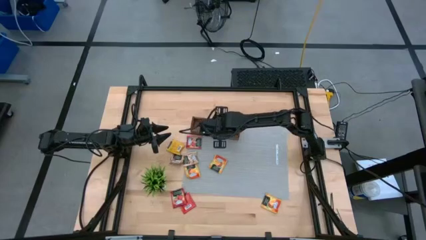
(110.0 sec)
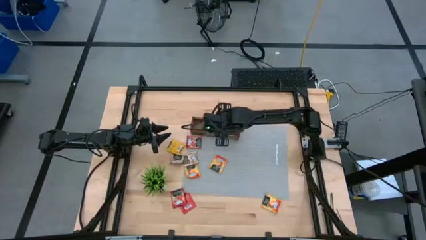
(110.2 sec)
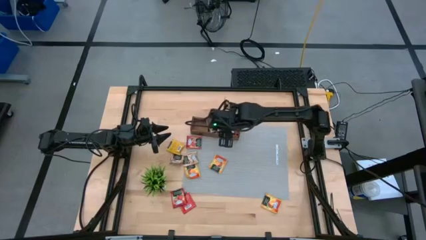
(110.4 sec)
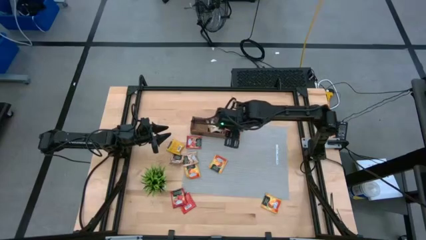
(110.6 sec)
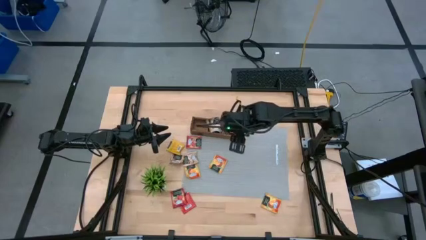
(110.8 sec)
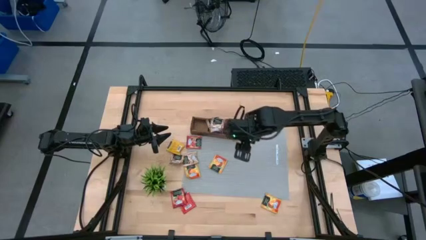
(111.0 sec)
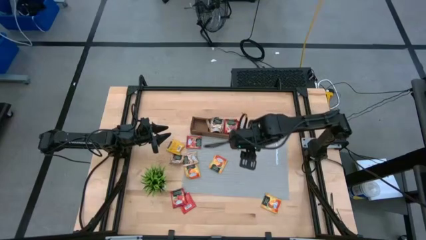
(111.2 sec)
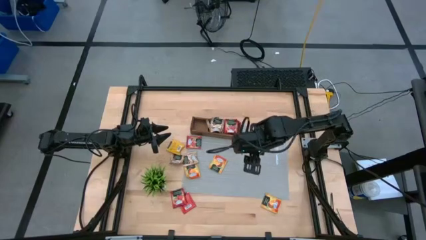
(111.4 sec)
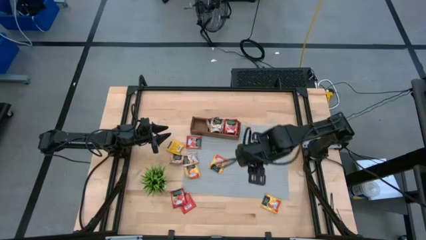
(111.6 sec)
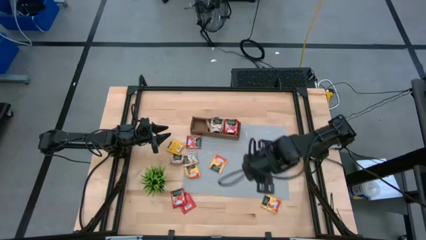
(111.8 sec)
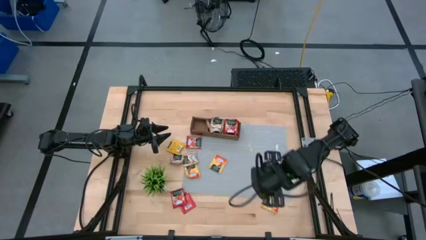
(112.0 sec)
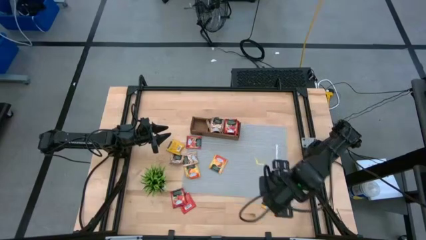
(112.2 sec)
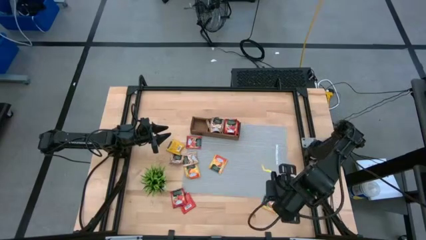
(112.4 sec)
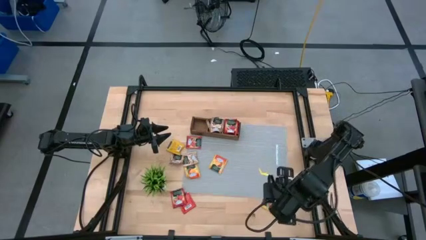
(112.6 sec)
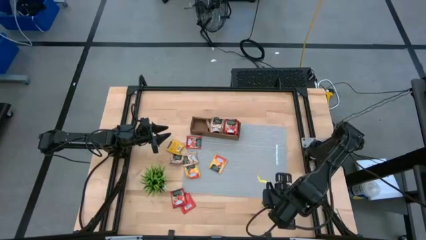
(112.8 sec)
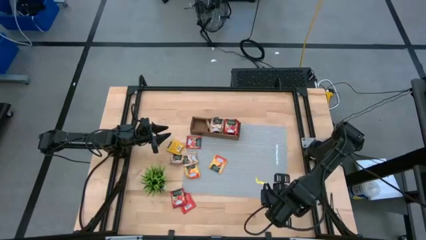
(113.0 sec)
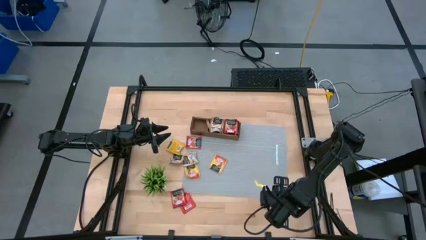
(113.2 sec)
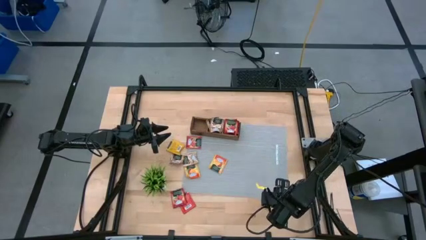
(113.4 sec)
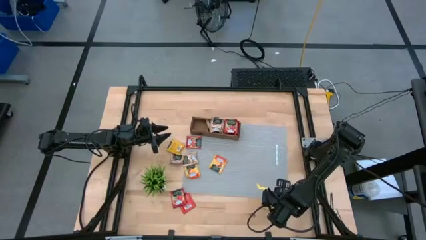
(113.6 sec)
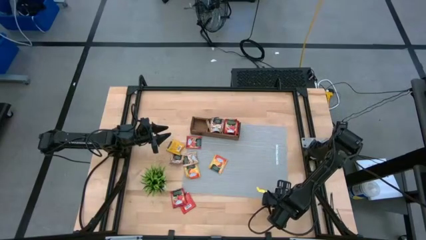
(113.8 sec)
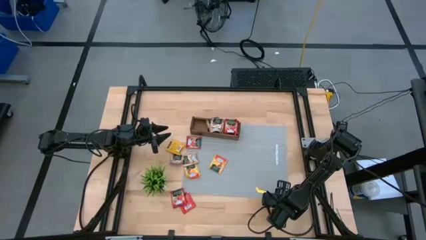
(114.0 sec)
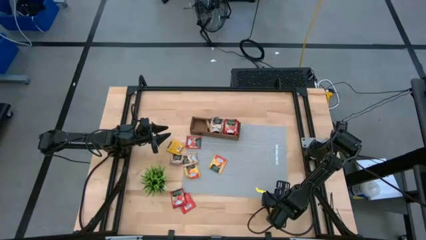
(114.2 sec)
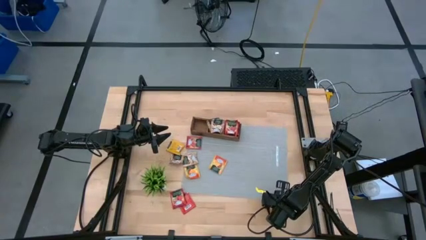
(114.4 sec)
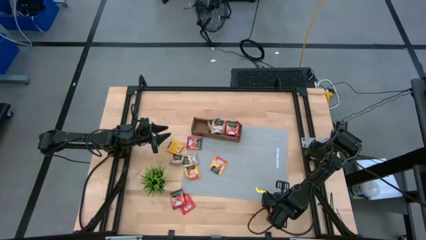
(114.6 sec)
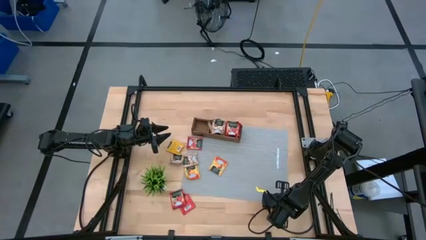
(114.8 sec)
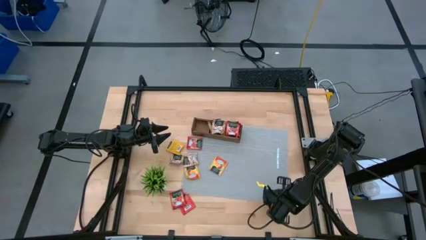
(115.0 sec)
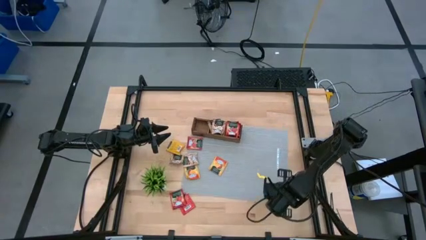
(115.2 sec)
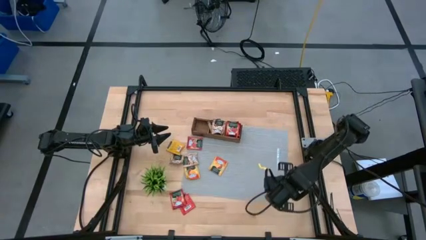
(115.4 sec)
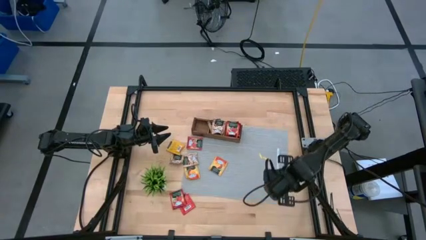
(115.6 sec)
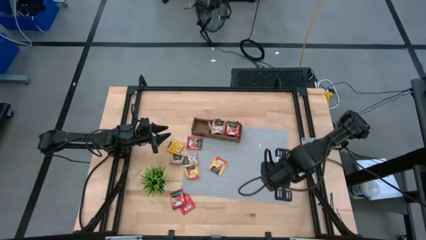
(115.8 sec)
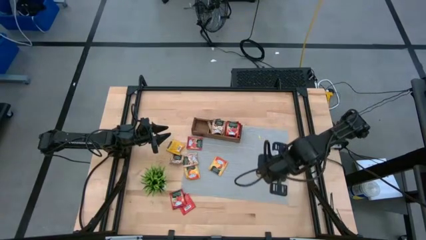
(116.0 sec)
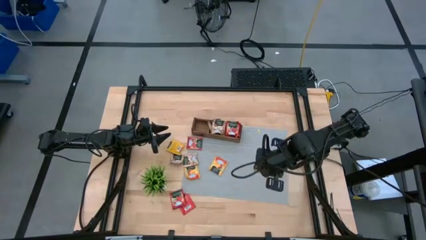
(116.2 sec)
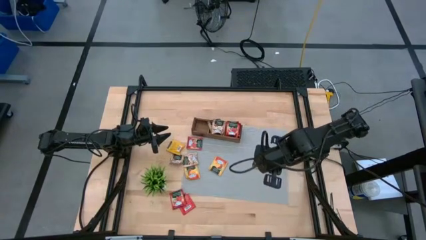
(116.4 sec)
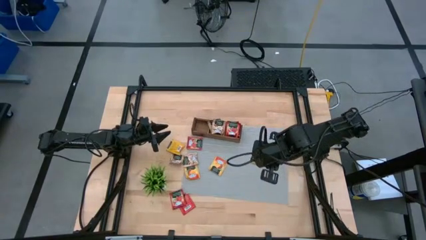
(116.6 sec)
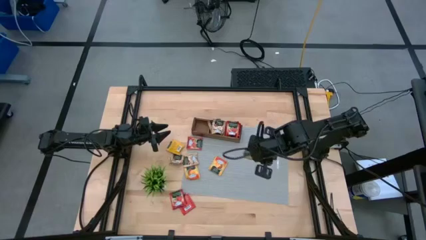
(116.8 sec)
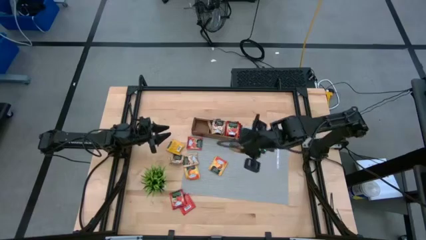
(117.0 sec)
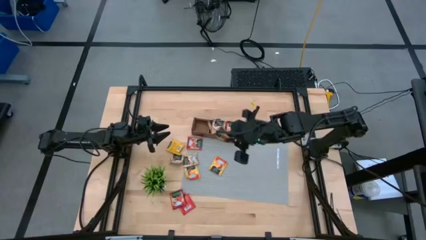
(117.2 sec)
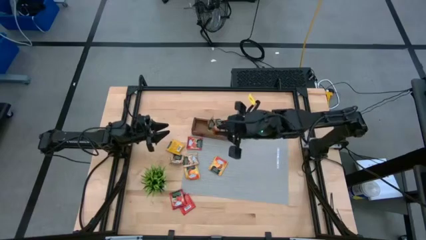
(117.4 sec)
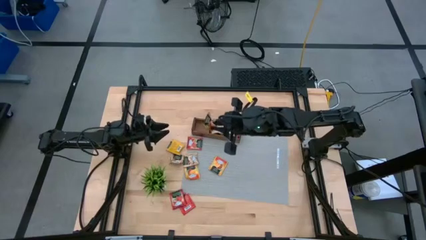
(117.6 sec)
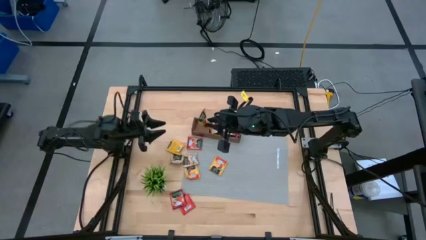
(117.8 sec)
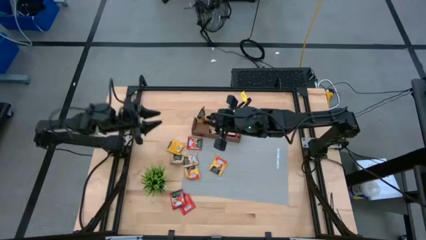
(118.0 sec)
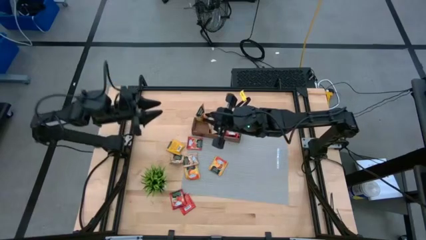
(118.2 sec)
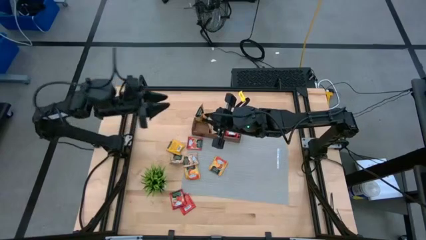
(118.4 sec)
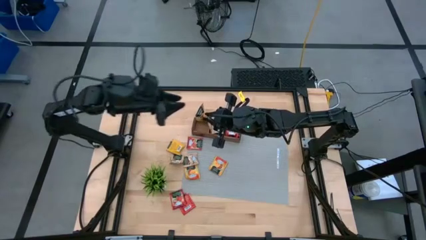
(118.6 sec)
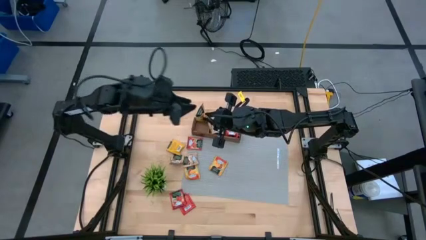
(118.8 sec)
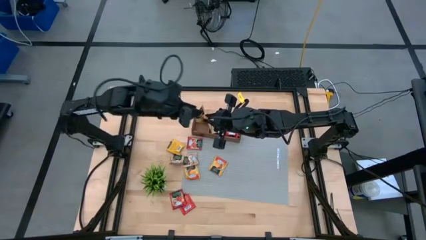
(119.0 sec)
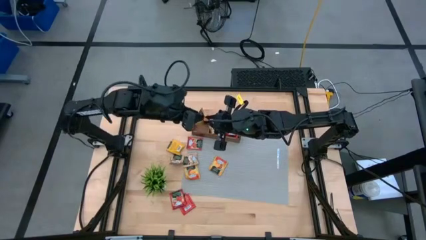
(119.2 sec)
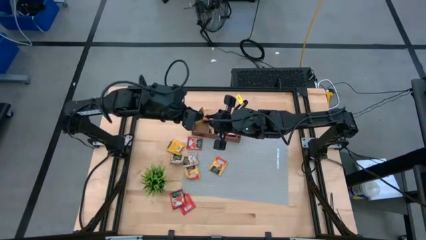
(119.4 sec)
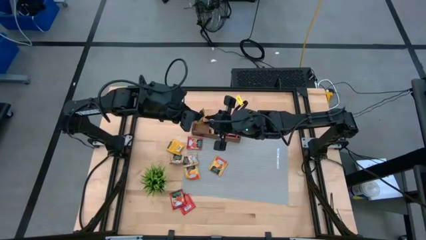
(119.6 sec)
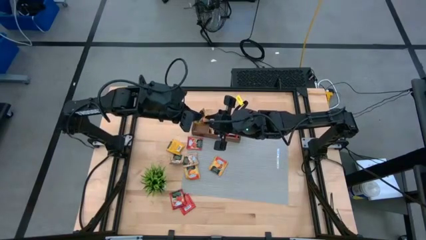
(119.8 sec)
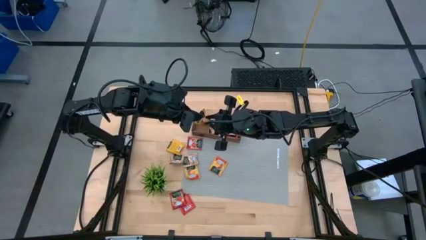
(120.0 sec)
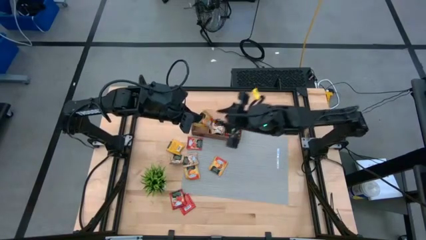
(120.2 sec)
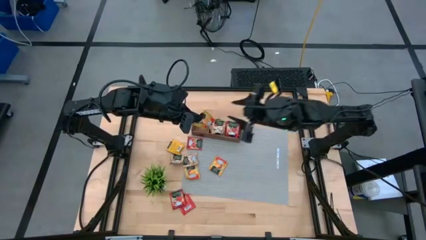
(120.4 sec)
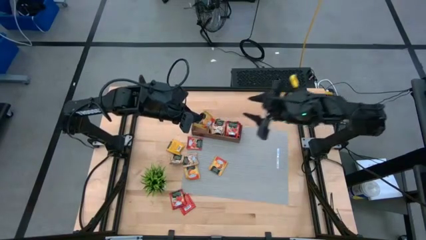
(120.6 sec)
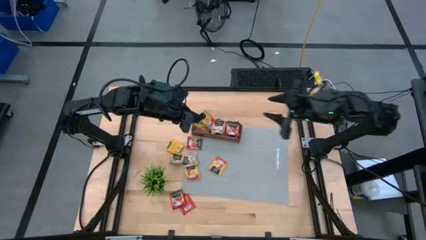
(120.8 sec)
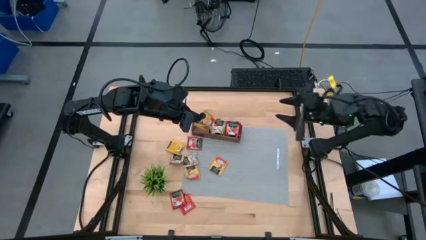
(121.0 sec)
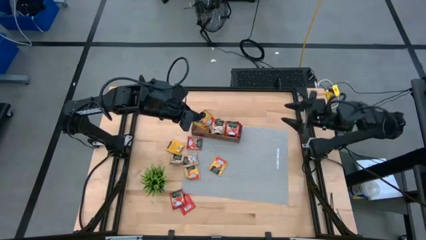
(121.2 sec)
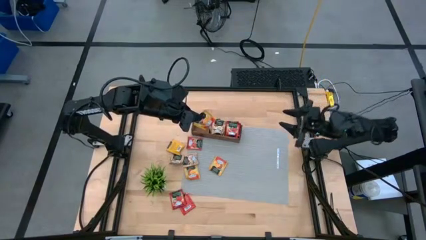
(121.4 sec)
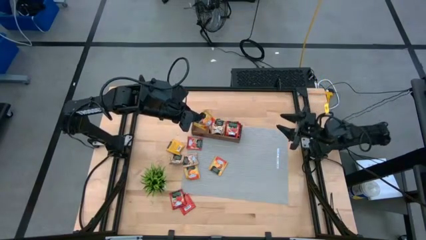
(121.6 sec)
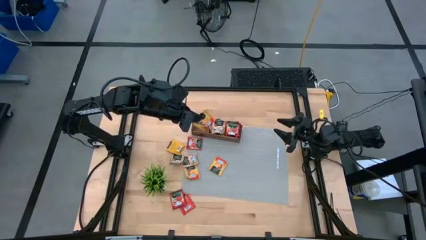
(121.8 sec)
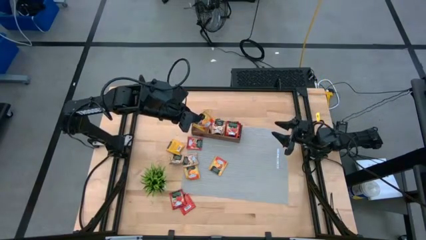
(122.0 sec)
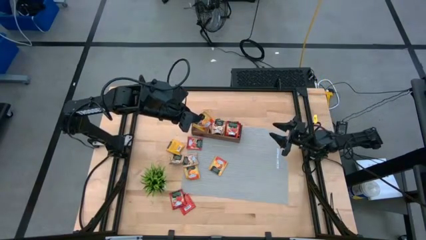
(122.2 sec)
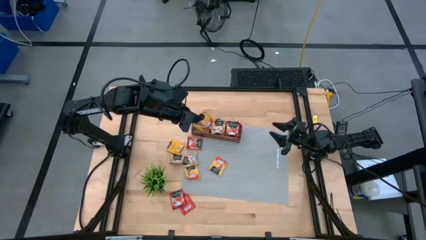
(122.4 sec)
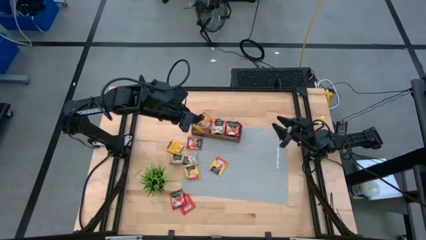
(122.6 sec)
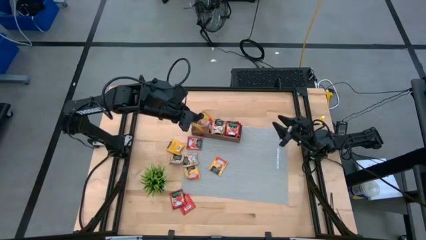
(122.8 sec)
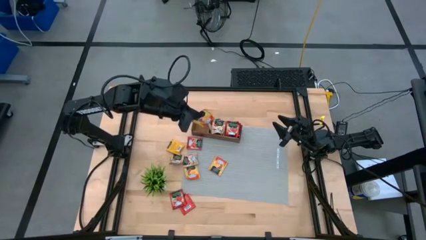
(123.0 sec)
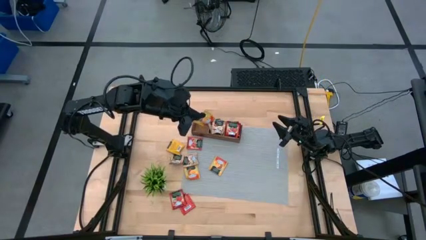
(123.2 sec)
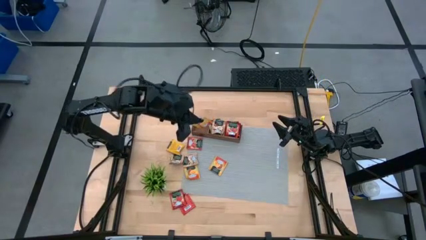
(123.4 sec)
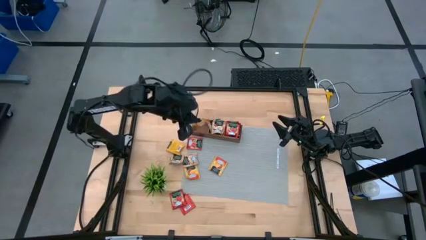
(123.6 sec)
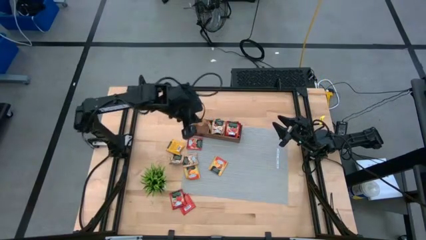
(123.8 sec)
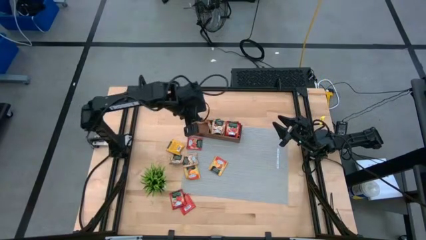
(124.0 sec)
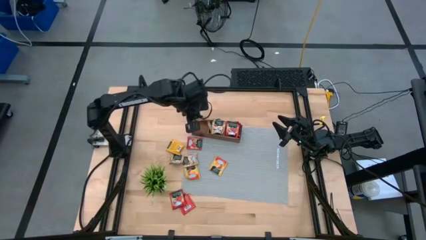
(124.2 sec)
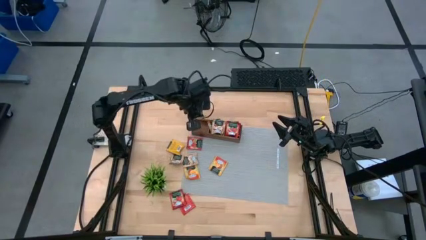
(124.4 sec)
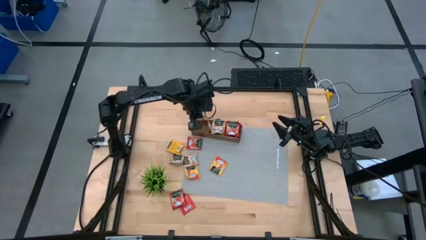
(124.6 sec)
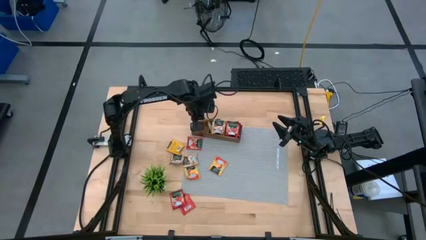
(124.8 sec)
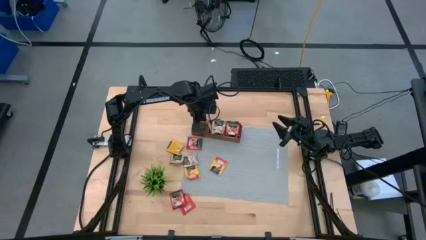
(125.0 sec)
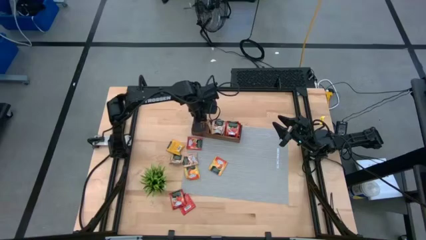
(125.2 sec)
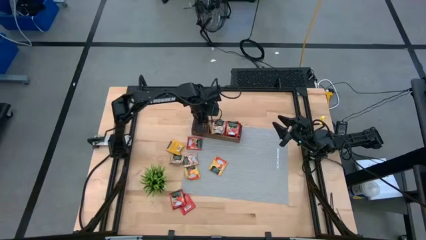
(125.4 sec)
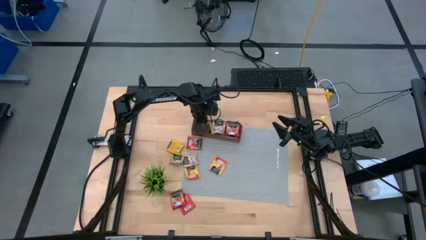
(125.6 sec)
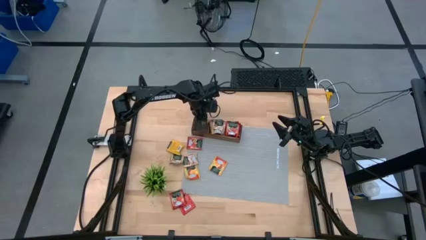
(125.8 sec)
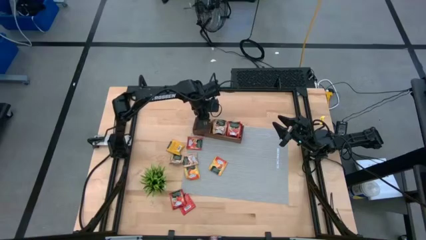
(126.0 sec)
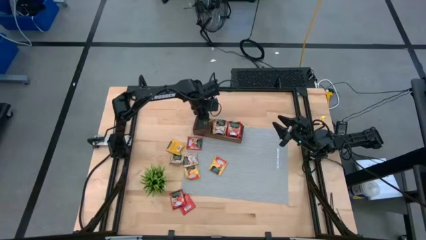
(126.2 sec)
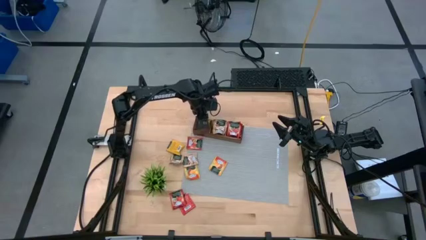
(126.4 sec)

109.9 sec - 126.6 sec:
Task: Pick & Place Tea
Put the yellow tea bag into the left section of the wooden organizer
